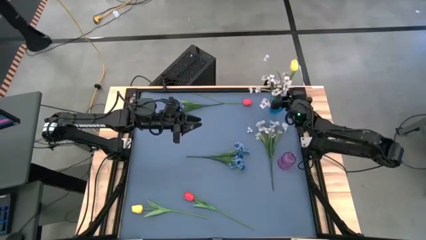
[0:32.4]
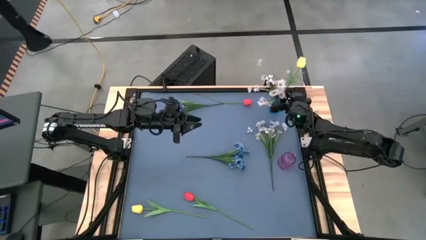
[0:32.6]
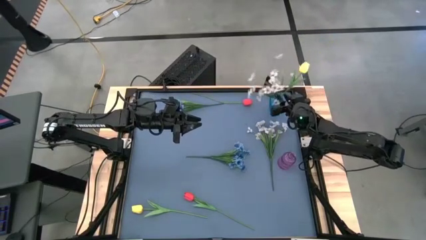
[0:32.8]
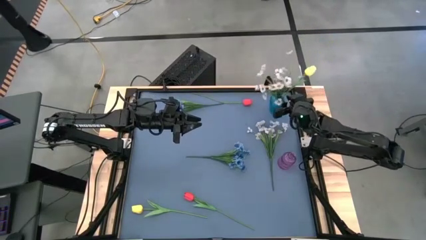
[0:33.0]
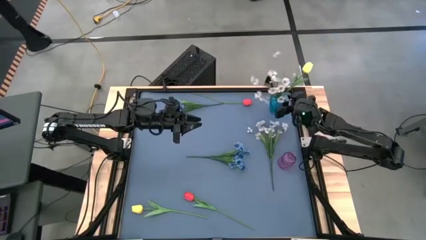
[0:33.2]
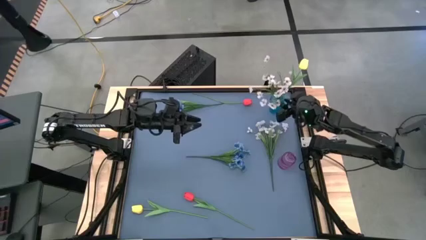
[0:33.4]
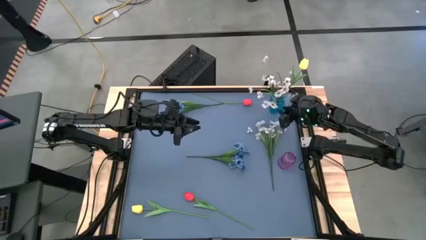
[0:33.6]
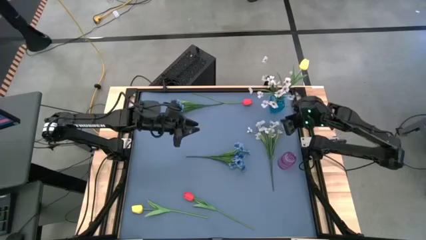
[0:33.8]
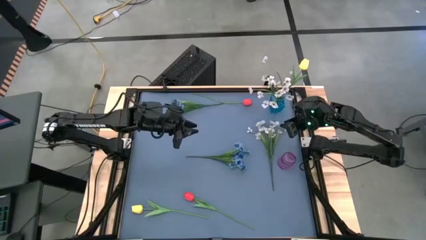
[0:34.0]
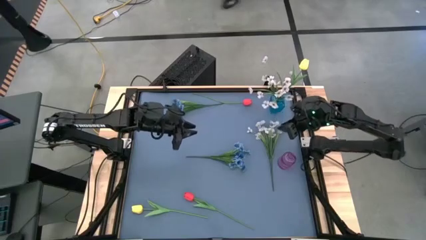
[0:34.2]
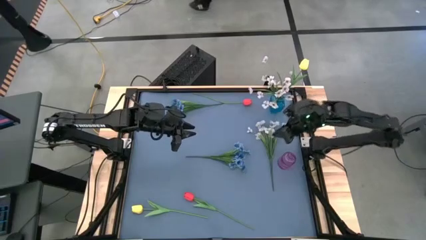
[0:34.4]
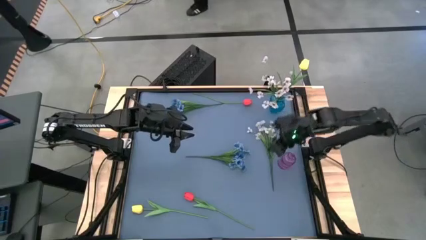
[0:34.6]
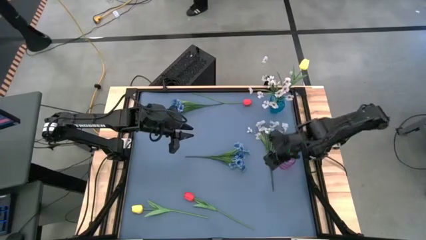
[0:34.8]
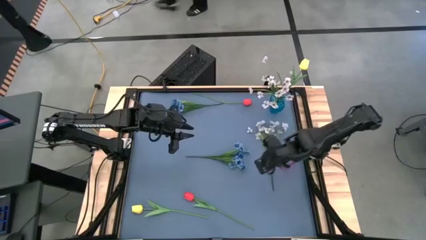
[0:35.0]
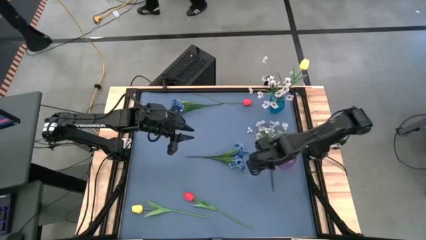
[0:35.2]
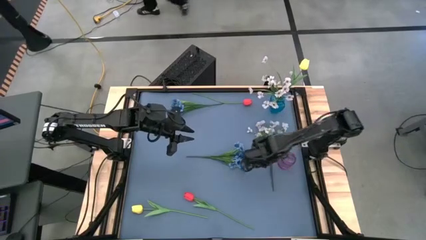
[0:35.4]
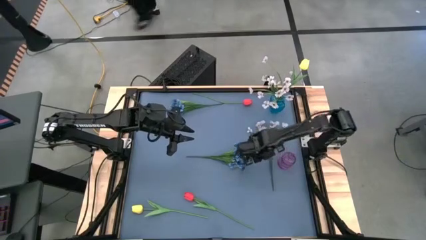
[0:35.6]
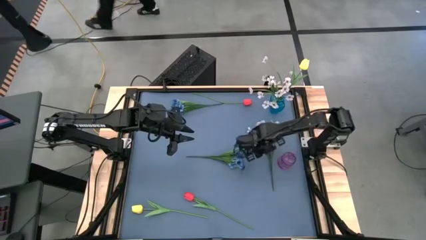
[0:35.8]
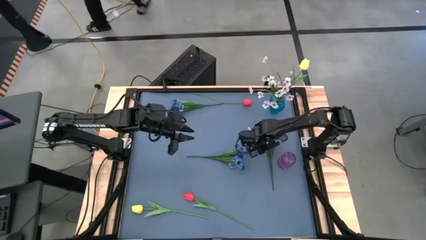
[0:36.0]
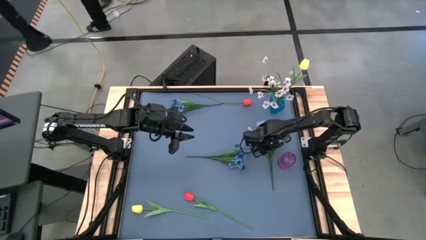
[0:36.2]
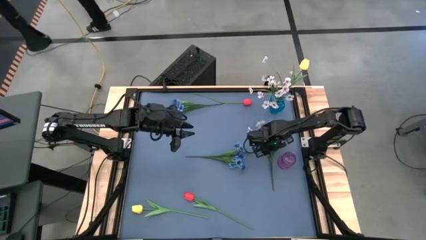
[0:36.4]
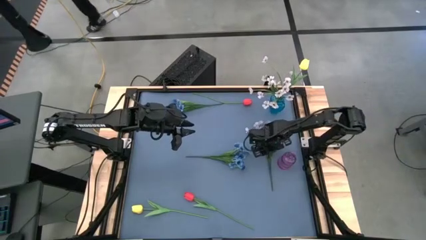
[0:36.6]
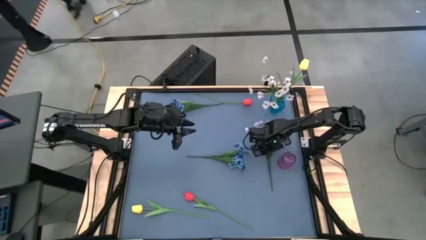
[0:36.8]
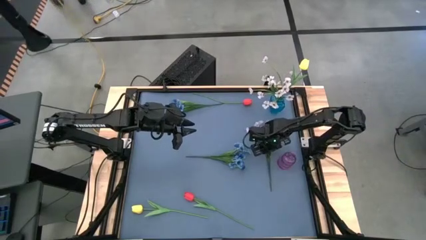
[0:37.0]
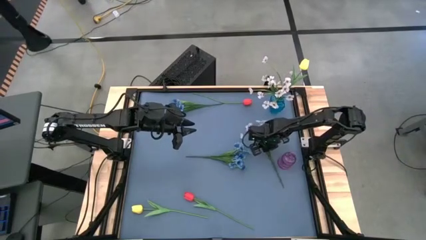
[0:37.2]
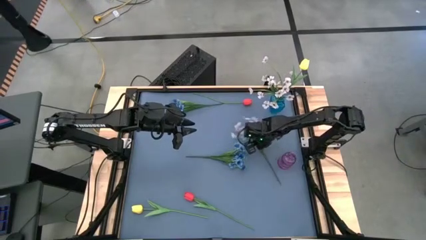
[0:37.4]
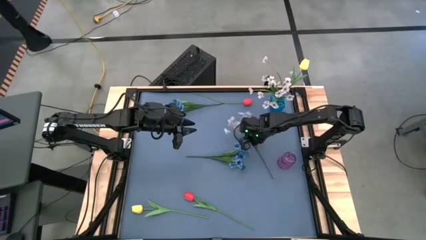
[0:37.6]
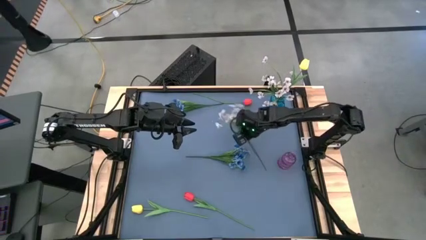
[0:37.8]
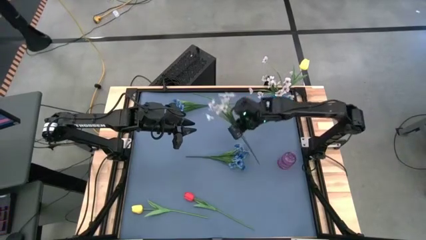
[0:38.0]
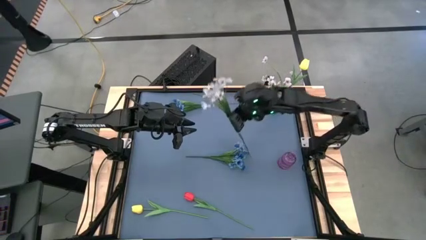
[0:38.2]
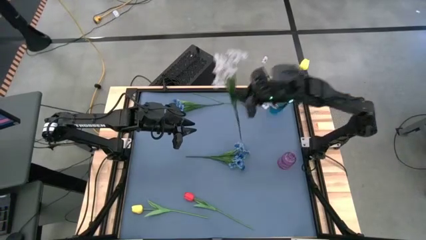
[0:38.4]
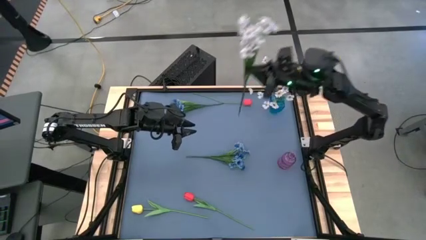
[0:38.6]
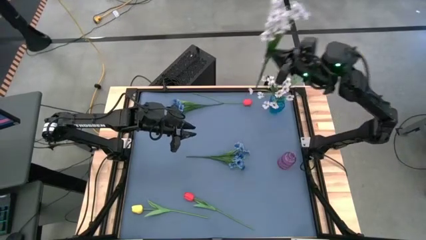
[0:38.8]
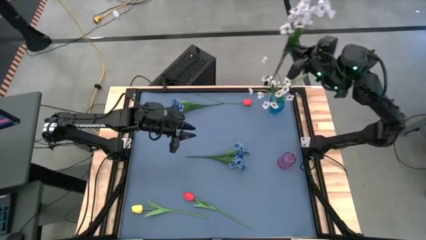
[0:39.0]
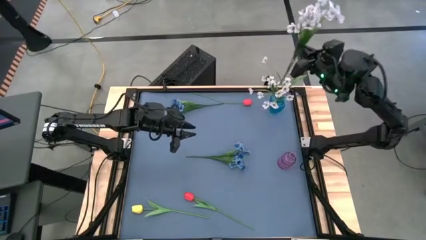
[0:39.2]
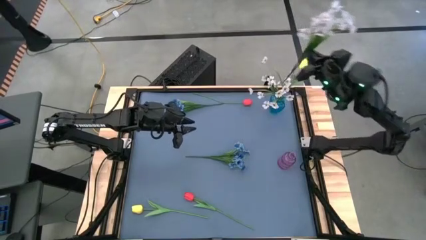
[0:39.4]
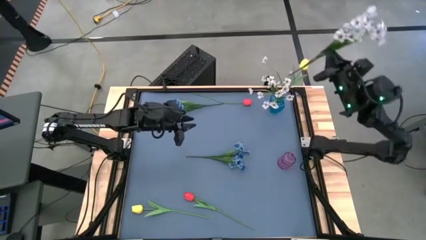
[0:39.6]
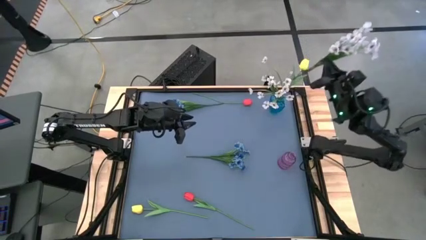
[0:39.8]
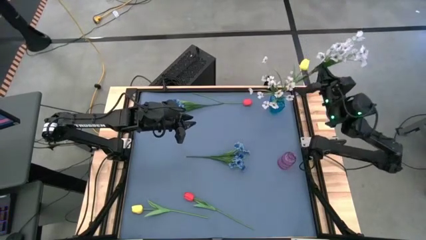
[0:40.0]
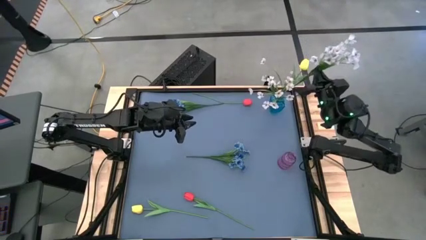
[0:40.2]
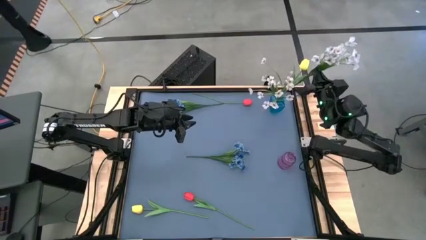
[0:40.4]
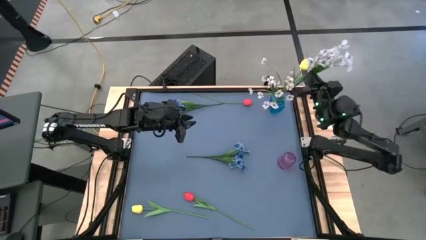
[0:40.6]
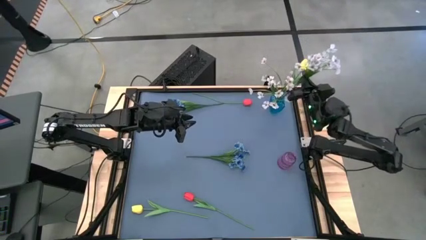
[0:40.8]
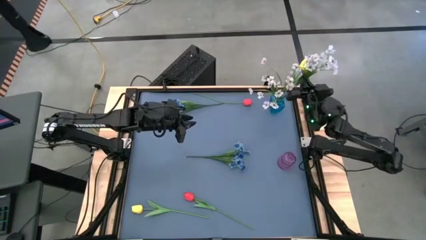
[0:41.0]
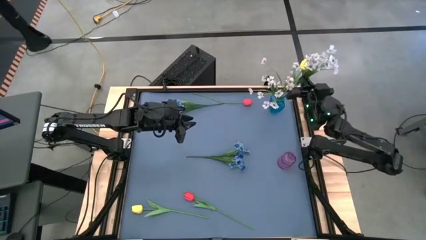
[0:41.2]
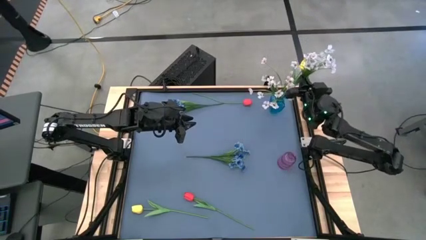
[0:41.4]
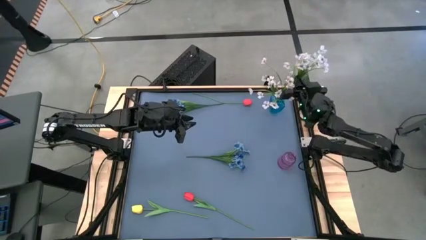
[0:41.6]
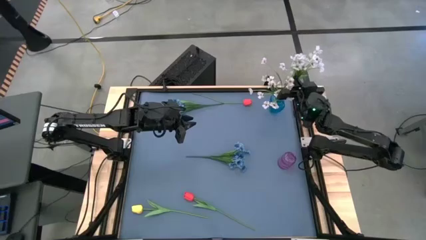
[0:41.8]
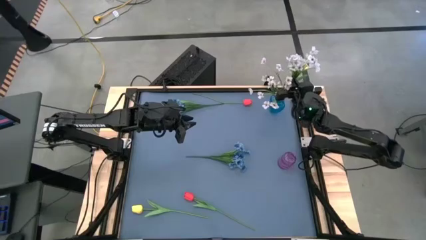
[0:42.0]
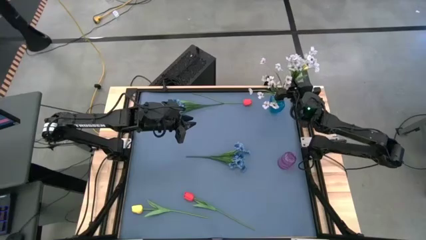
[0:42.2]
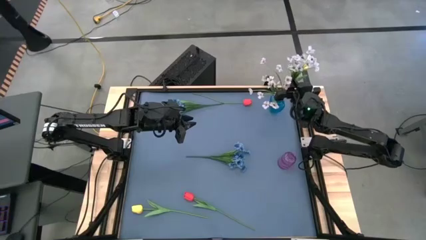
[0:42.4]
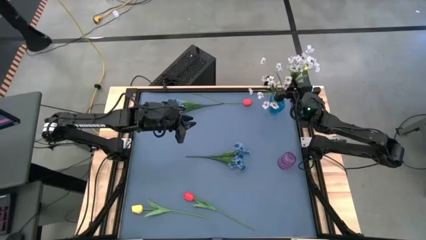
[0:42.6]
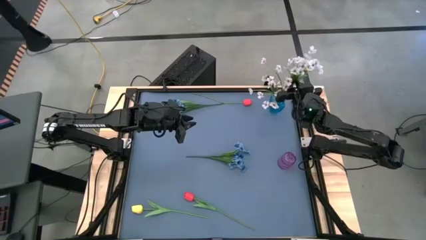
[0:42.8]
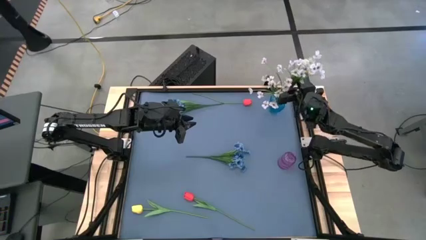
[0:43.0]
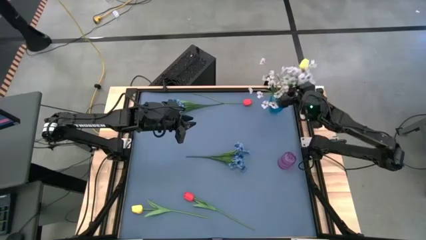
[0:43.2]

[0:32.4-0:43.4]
Task: Sort flowers into vase by color
Put the white flowers into the blue vase
